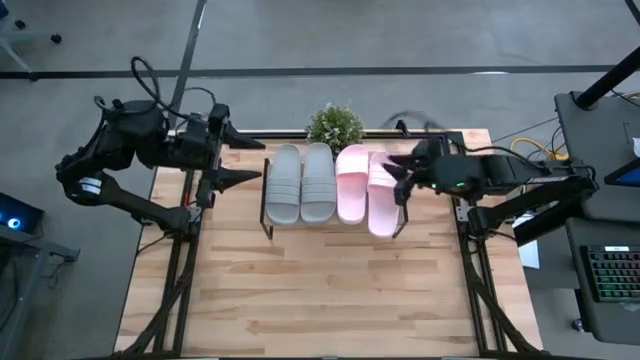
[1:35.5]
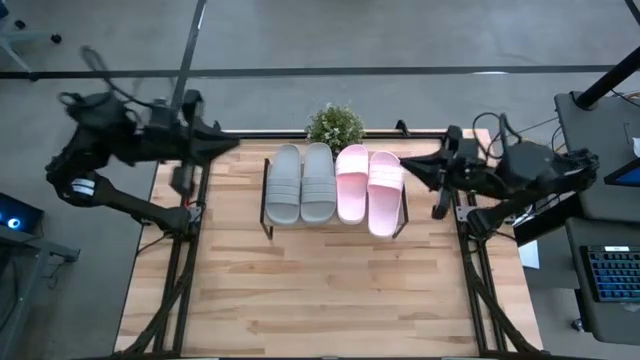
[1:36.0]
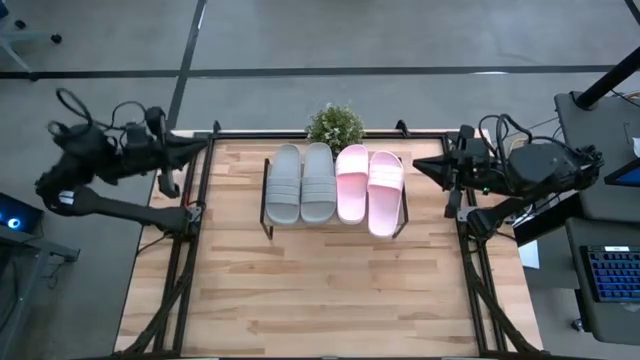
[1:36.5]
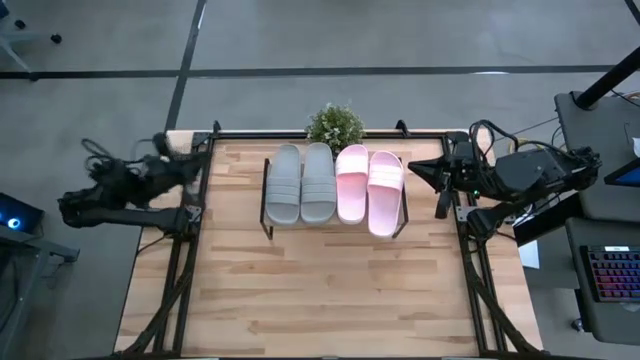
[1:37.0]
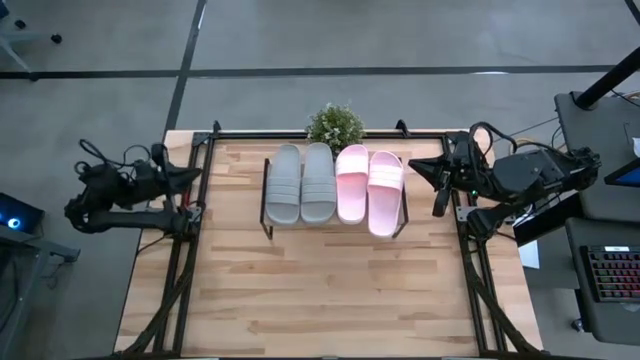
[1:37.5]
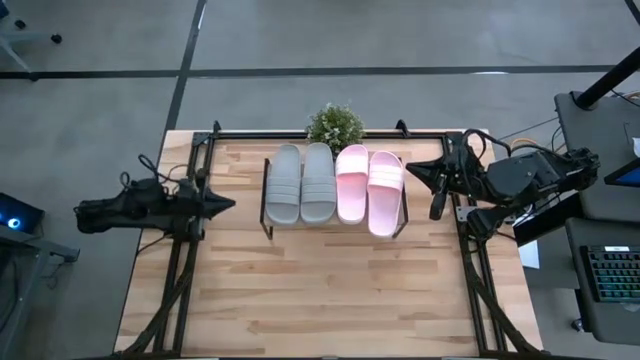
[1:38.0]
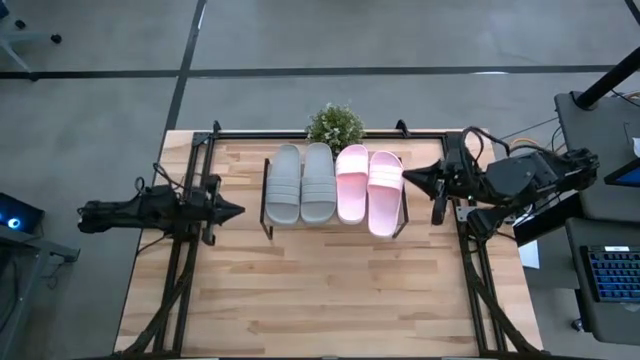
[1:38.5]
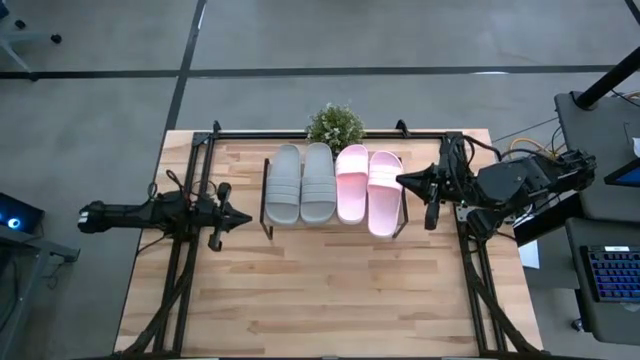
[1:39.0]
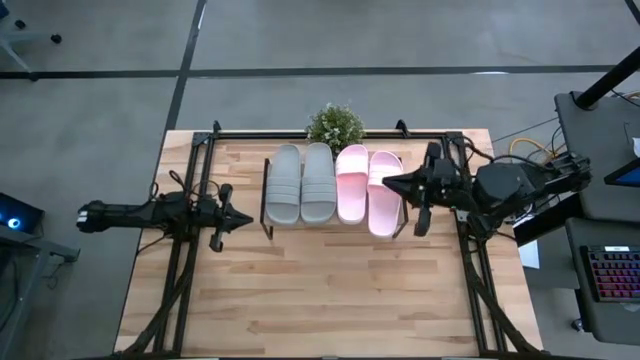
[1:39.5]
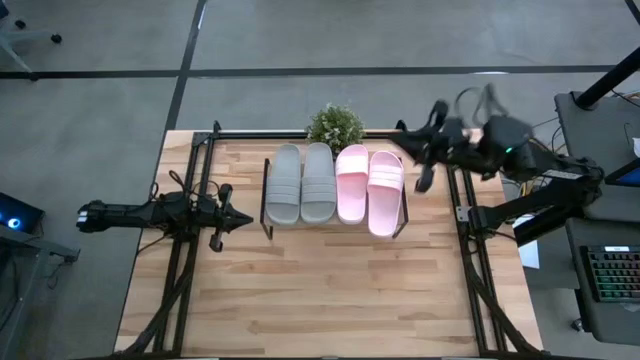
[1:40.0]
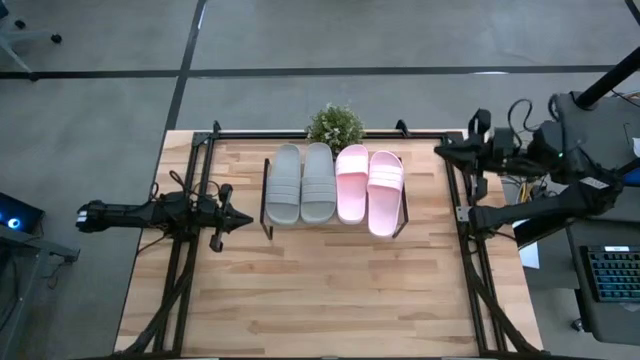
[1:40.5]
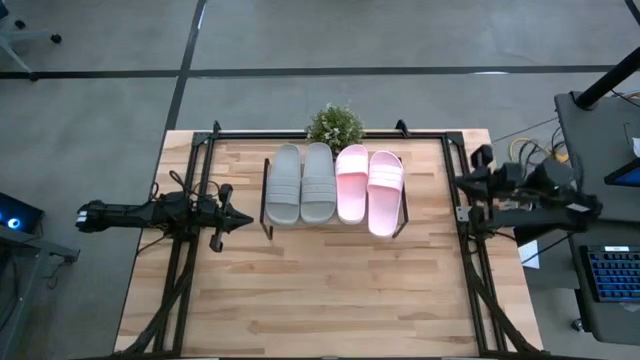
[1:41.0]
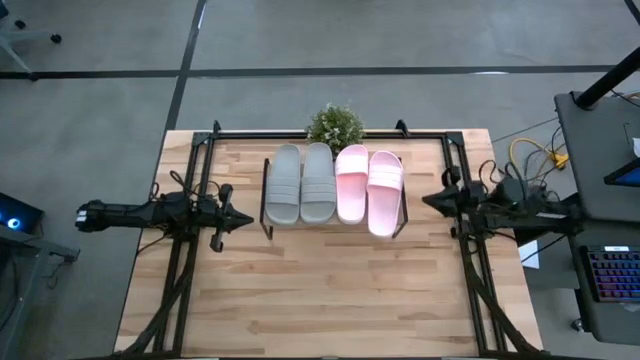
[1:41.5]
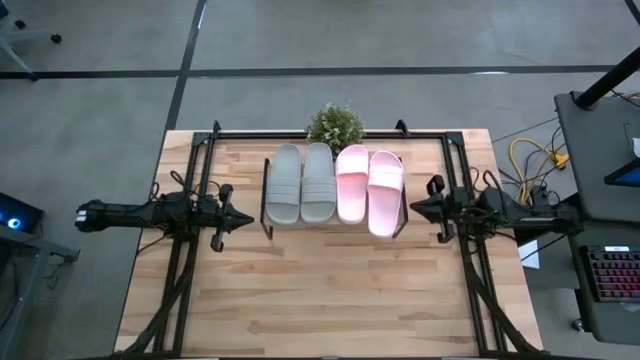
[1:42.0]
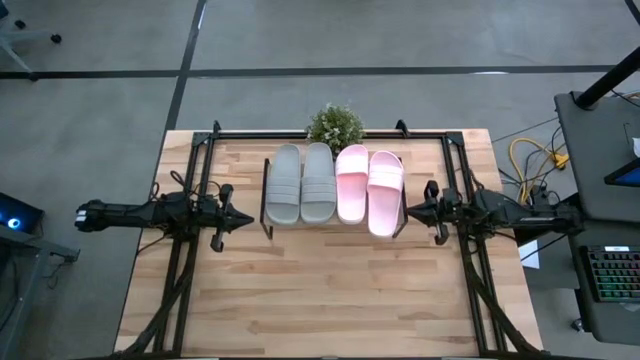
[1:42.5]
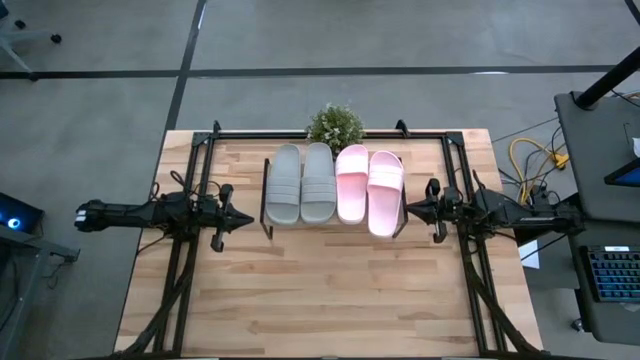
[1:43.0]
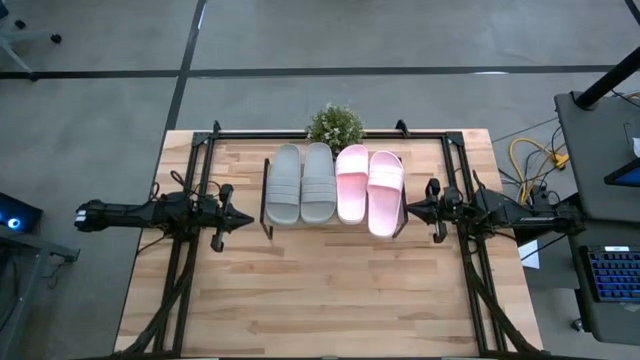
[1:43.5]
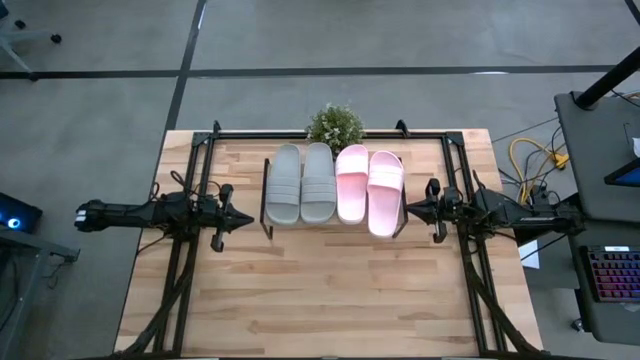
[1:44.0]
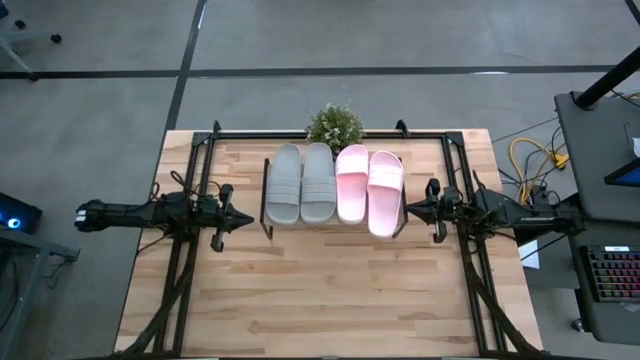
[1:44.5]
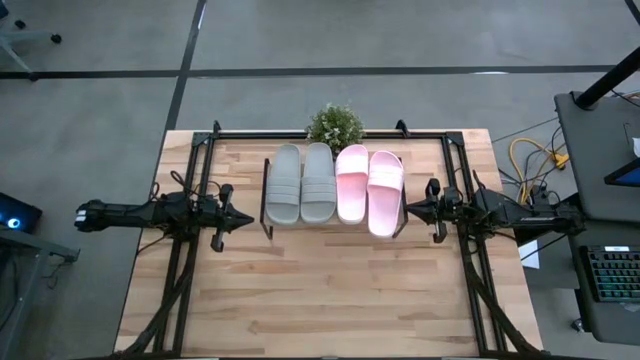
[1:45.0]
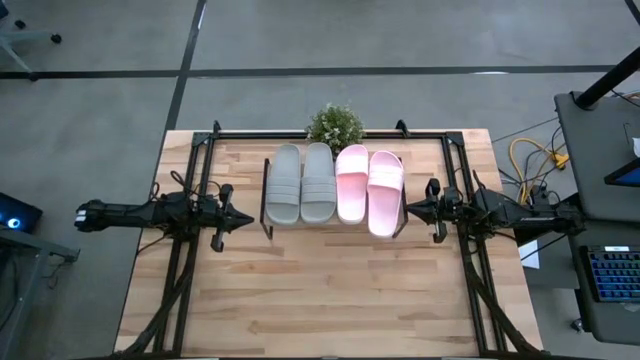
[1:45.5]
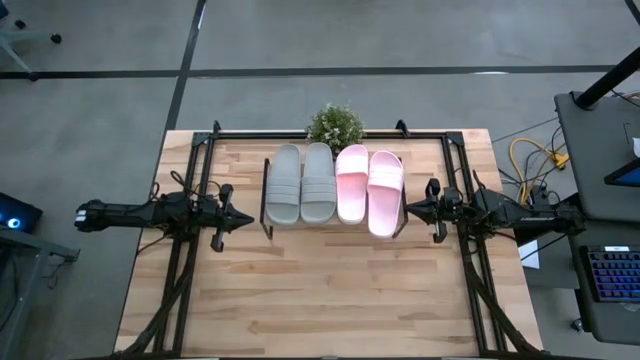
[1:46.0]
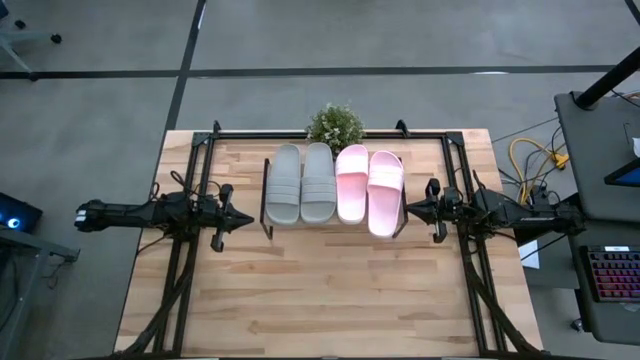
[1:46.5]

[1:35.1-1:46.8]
Task: Pick and place slides into the shelf
Return to Home Position

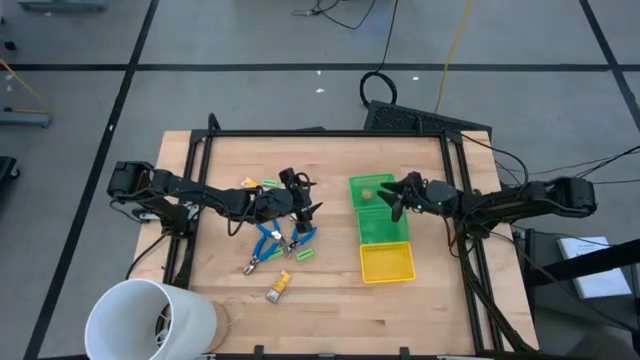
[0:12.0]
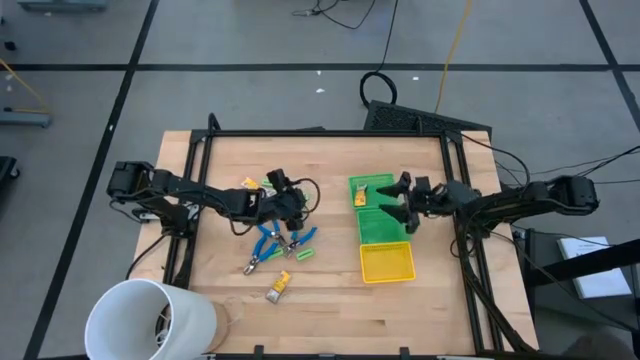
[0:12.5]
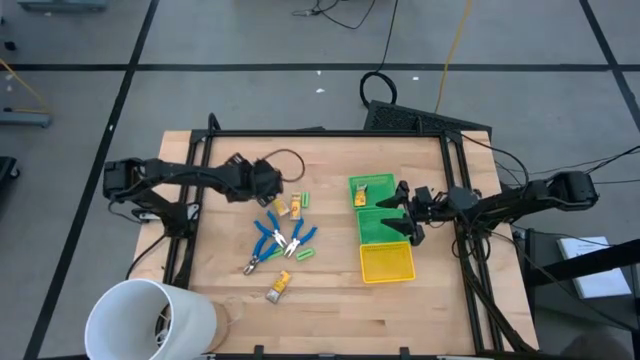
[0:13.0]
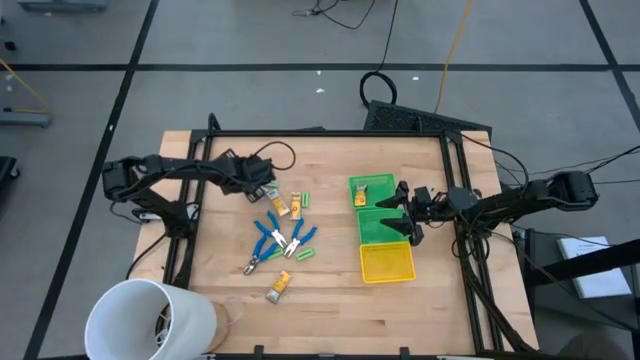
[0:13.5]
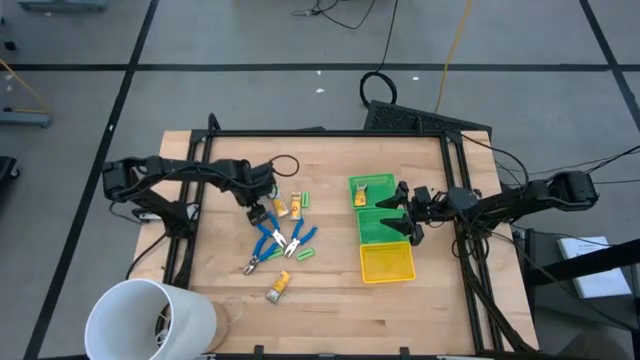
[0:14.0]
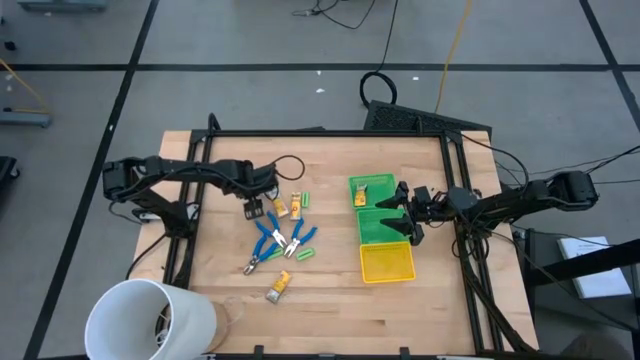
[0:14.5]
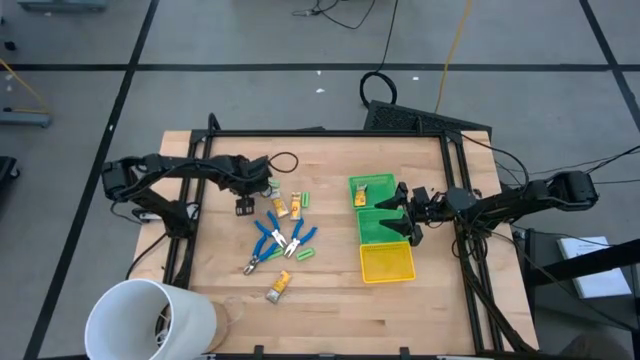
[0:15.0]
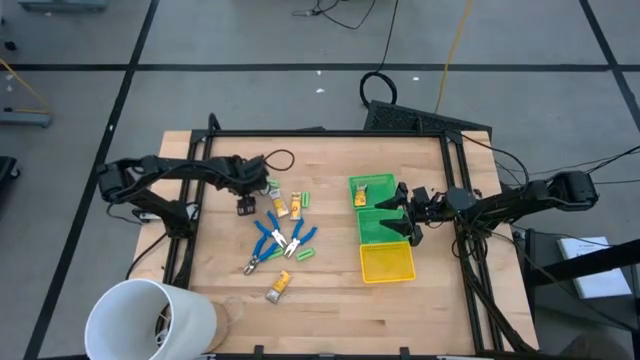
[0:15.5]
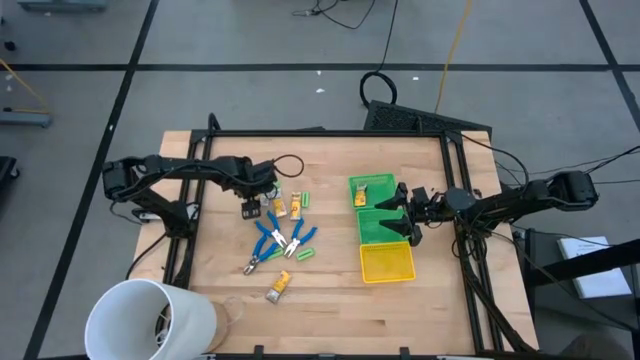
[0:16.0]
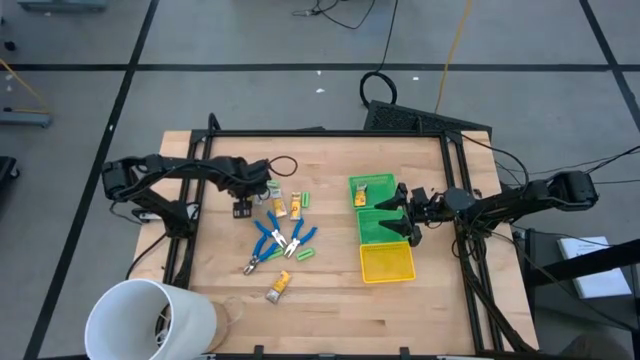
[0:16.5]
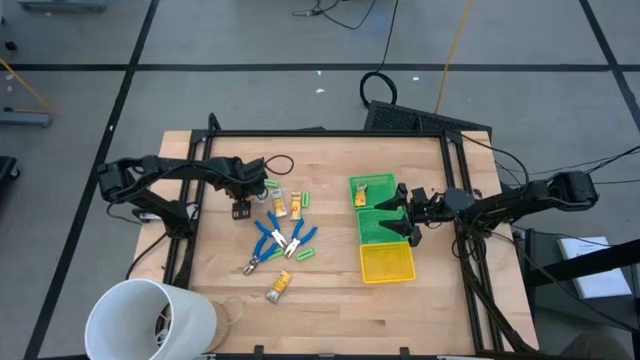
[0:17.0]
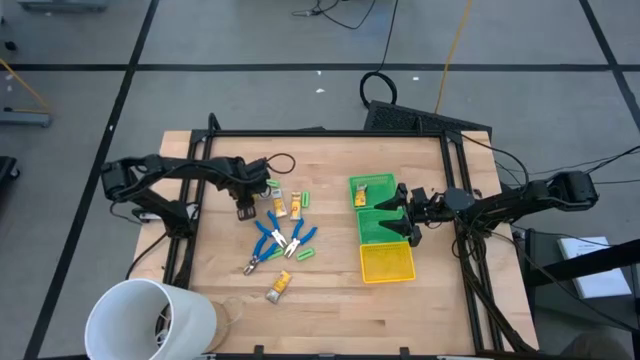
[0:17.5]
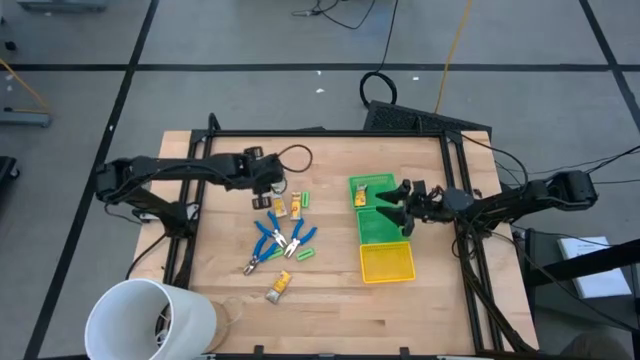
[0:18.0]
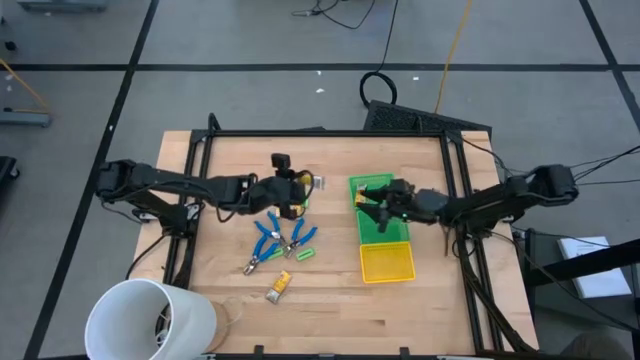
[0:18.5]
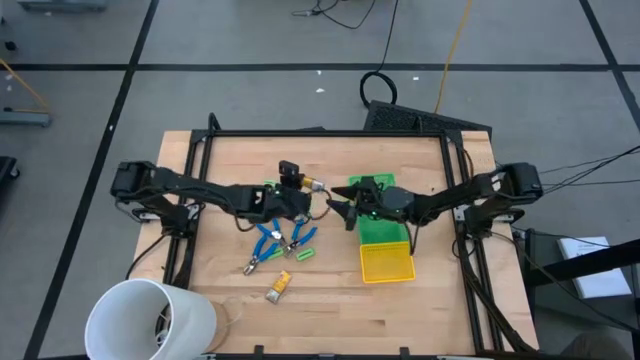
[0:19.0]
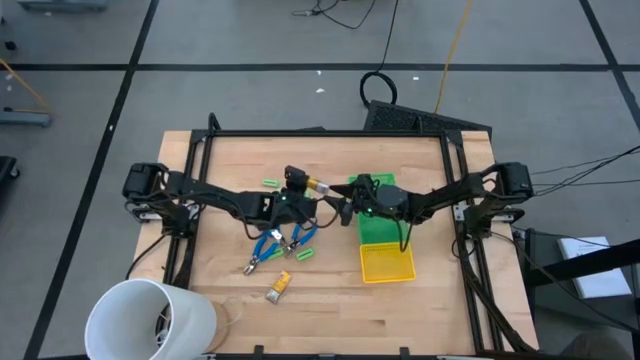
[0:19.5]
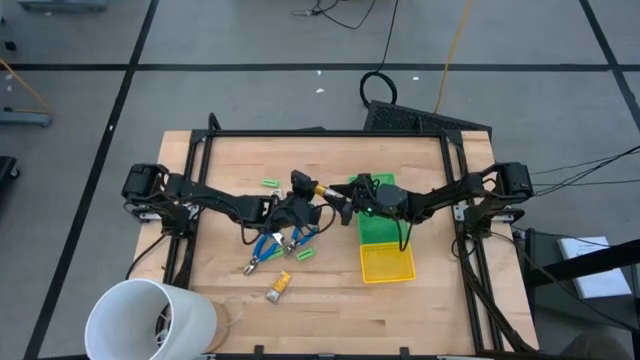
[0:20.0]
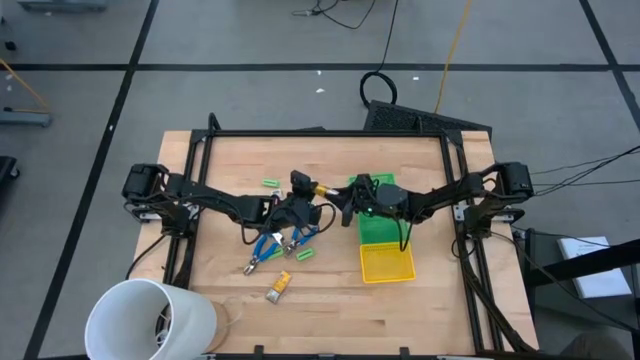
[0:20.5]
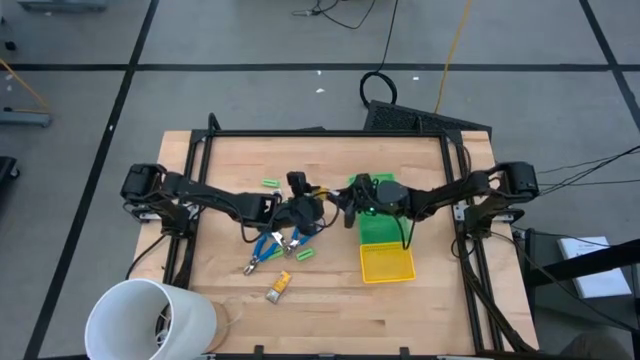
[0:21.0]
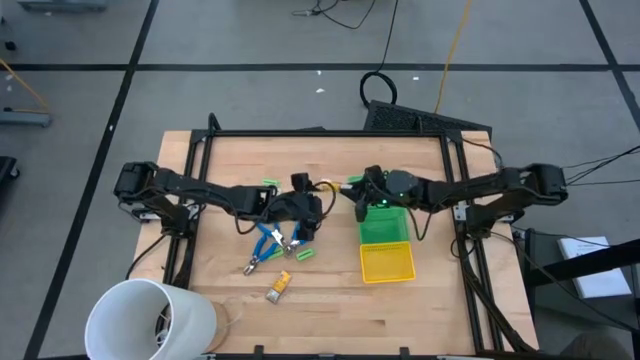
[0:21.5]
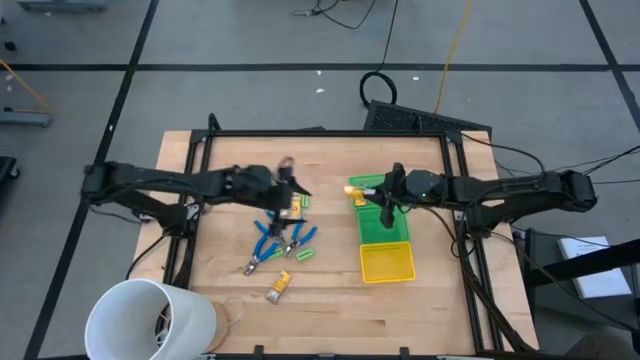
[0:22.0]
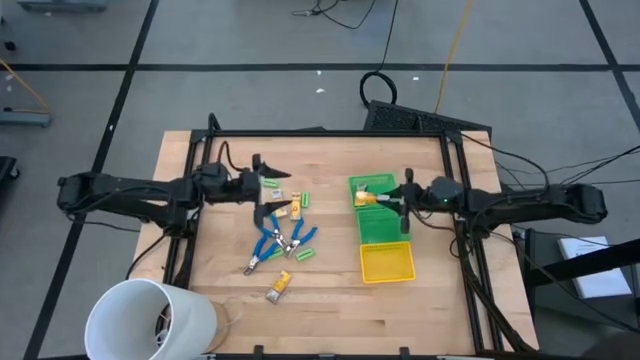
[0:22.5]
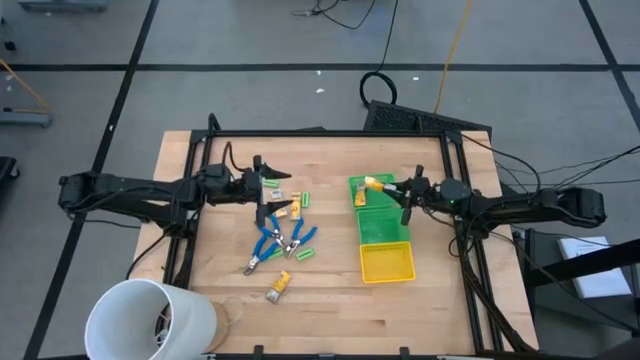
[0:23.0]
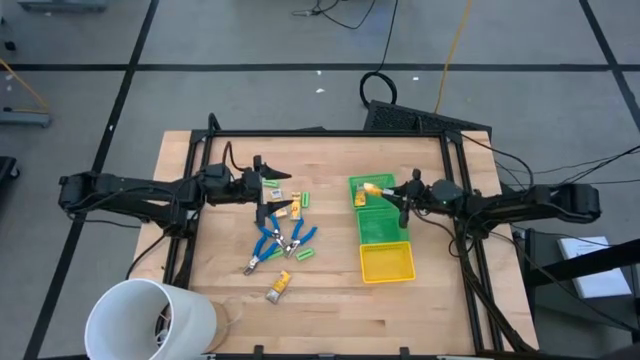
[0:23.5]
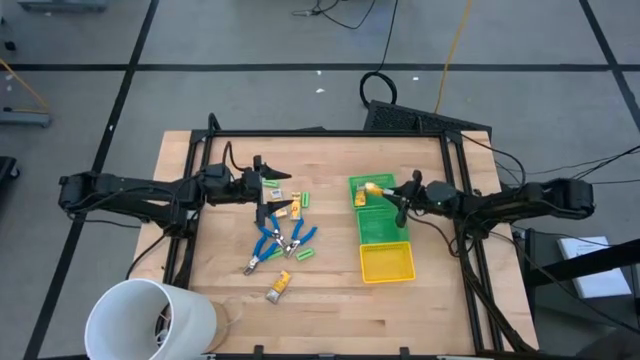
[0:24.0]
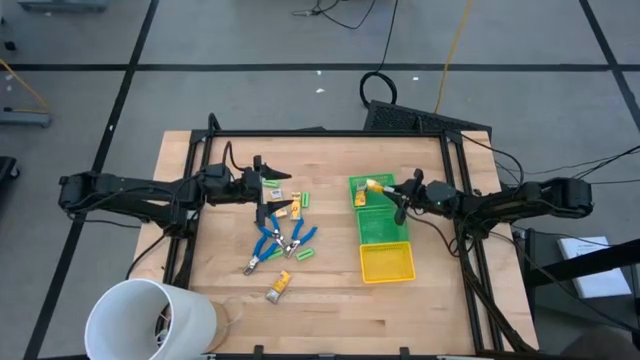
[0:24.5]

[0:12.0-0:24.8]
Task: Pick & Place School Supplies
Put the yellow crayon box into the top green bin
